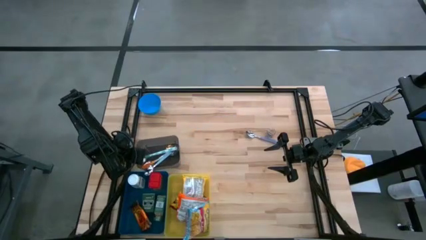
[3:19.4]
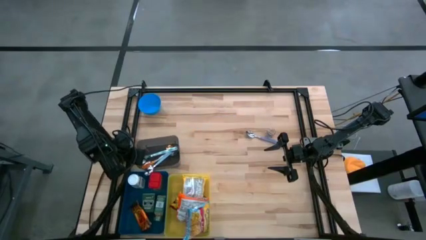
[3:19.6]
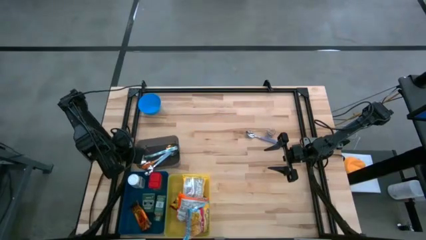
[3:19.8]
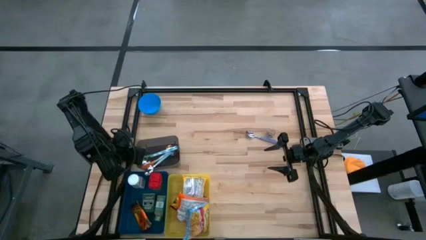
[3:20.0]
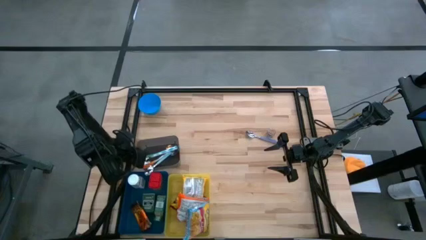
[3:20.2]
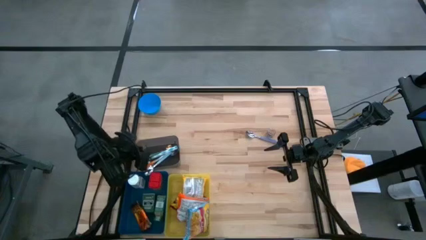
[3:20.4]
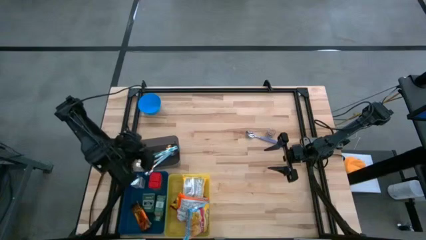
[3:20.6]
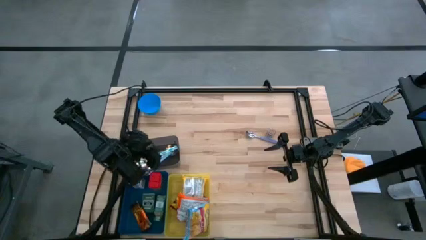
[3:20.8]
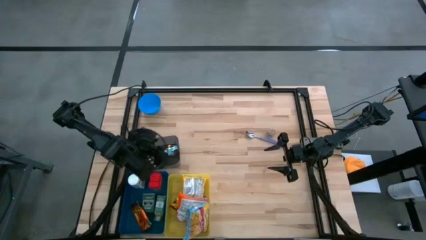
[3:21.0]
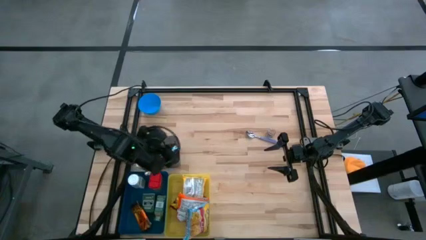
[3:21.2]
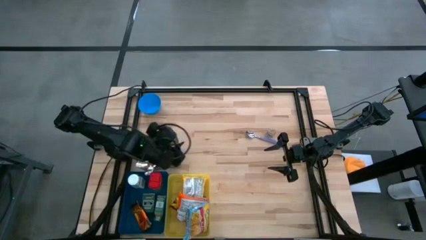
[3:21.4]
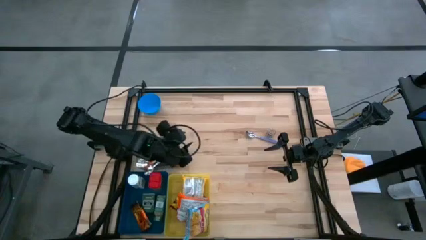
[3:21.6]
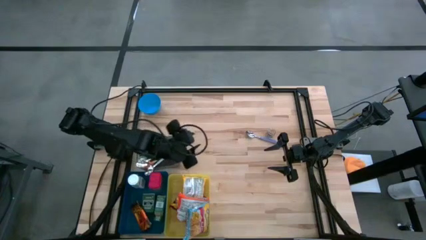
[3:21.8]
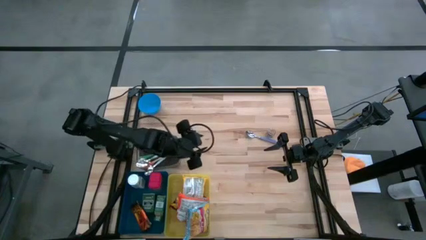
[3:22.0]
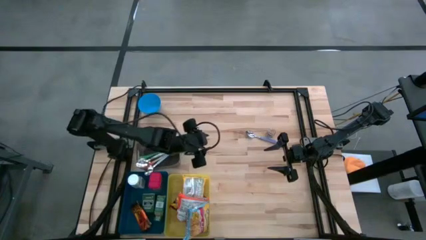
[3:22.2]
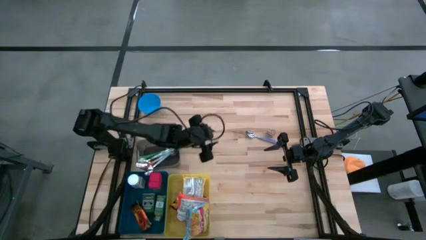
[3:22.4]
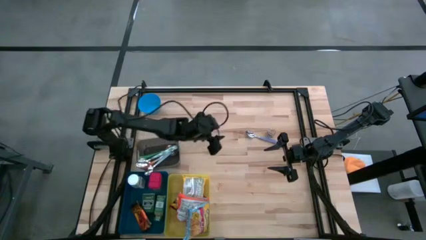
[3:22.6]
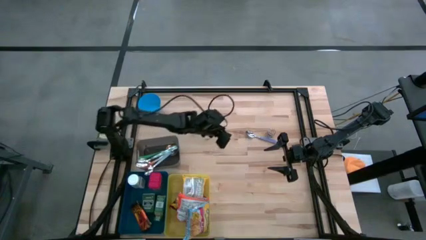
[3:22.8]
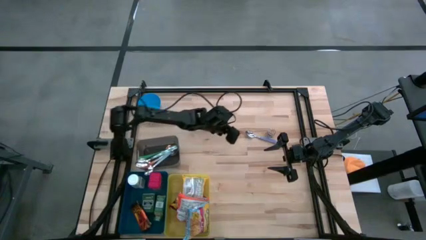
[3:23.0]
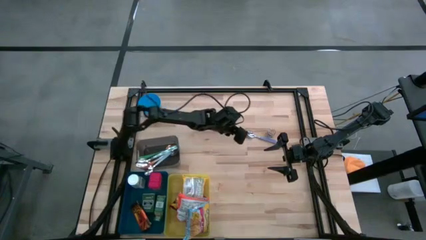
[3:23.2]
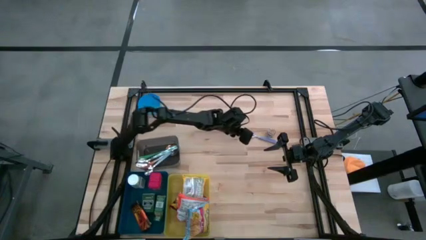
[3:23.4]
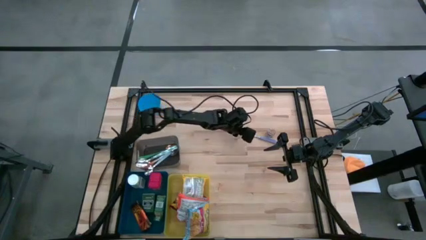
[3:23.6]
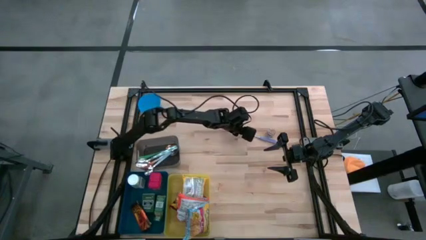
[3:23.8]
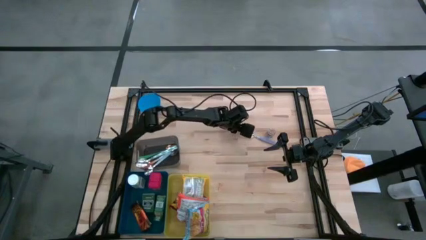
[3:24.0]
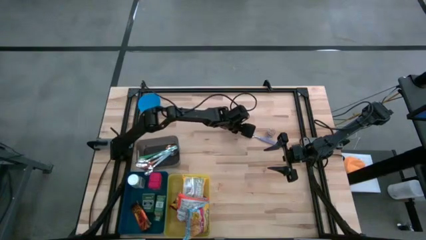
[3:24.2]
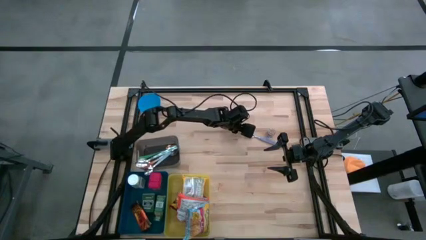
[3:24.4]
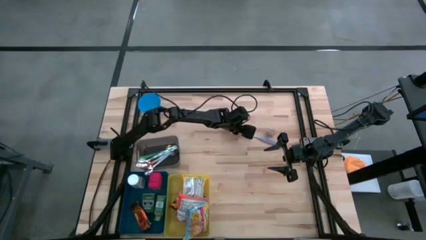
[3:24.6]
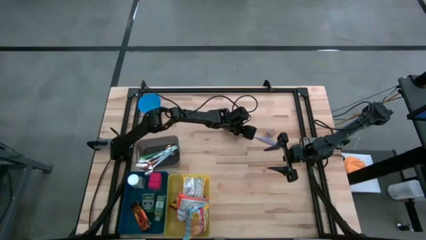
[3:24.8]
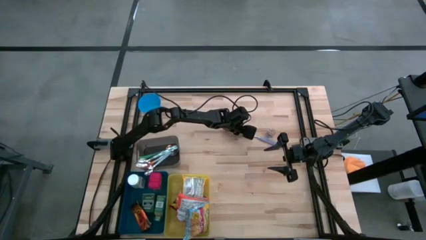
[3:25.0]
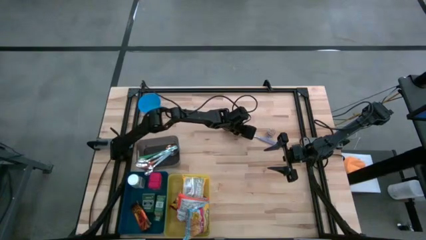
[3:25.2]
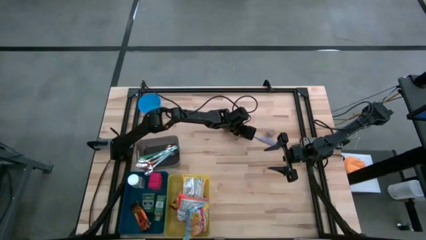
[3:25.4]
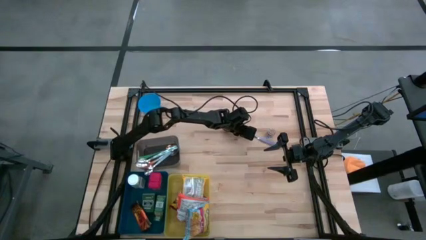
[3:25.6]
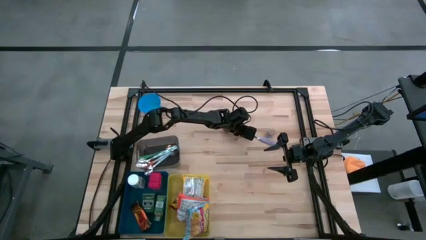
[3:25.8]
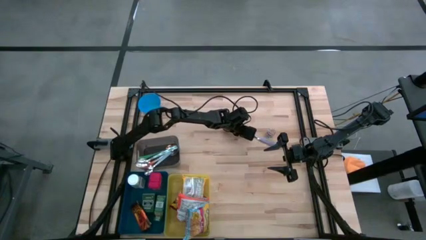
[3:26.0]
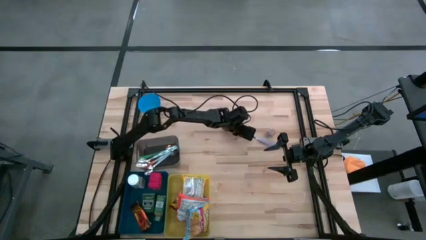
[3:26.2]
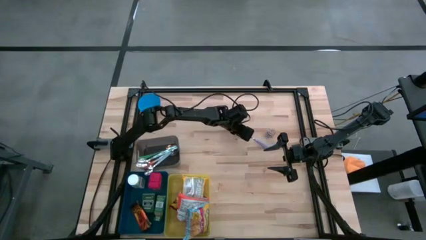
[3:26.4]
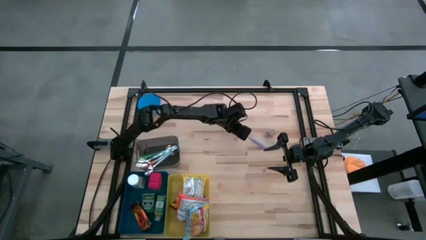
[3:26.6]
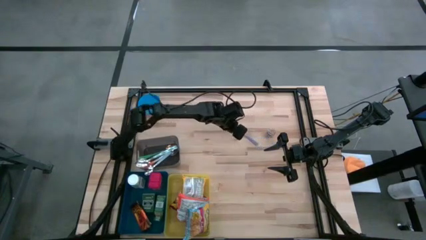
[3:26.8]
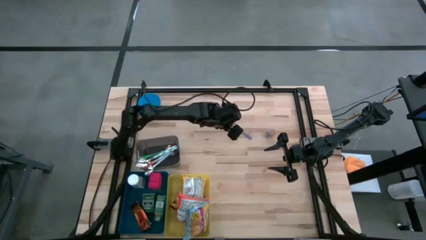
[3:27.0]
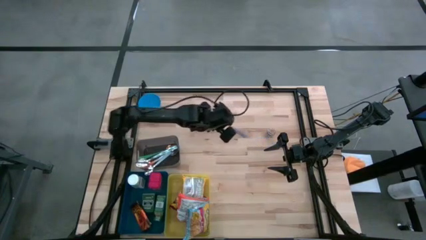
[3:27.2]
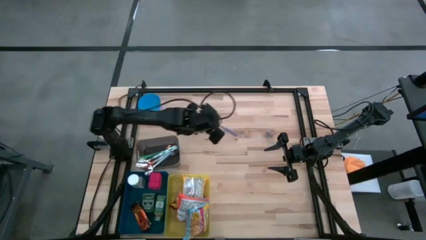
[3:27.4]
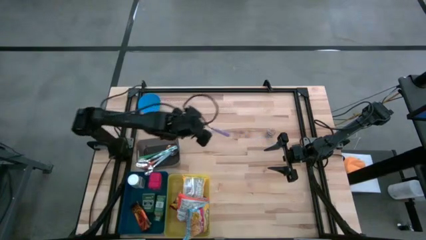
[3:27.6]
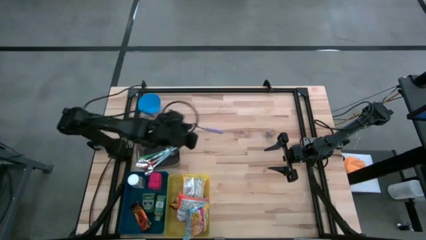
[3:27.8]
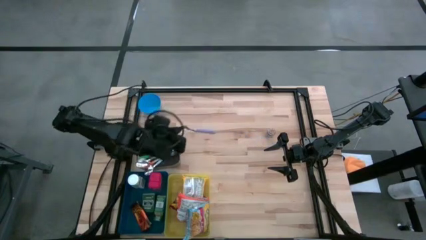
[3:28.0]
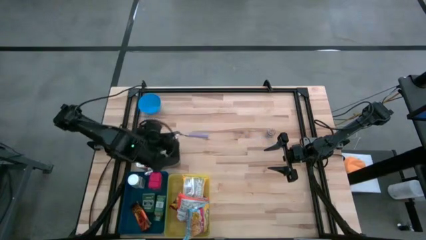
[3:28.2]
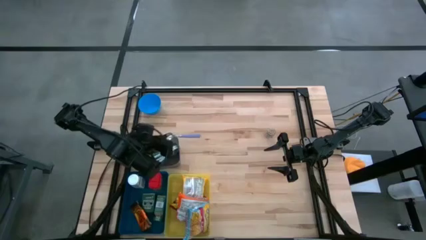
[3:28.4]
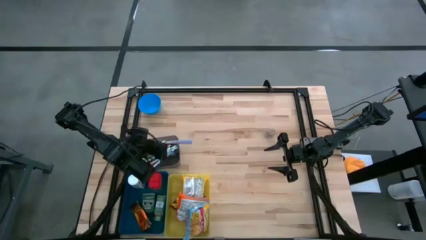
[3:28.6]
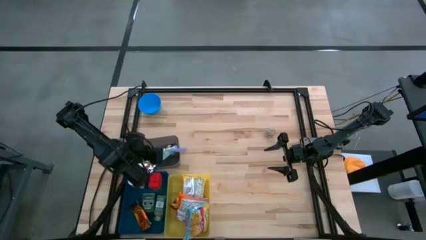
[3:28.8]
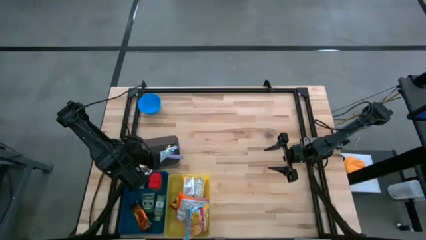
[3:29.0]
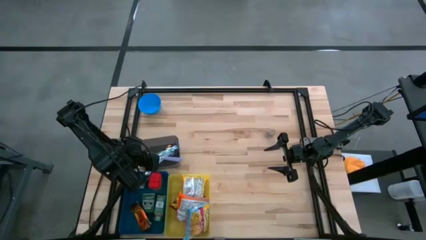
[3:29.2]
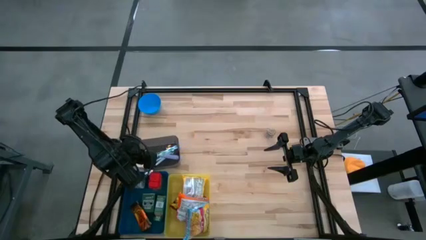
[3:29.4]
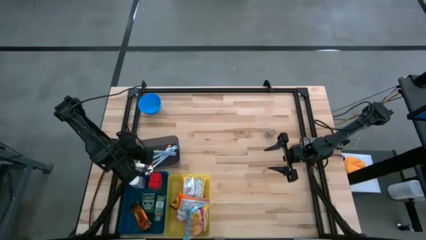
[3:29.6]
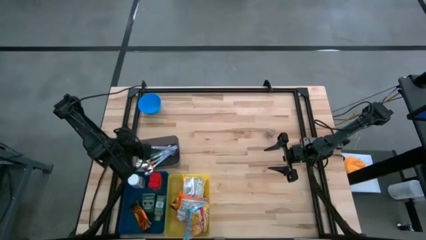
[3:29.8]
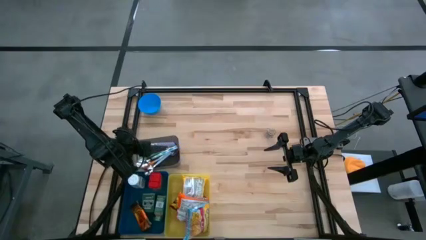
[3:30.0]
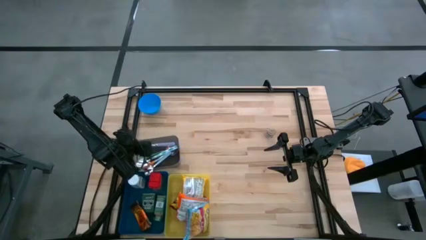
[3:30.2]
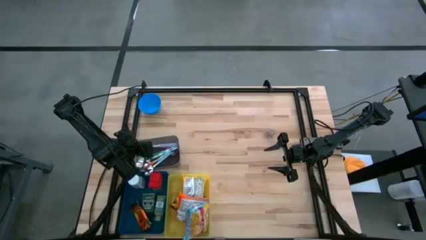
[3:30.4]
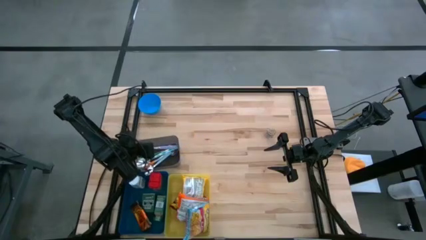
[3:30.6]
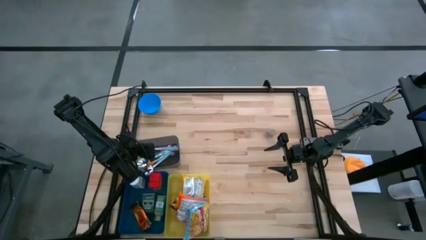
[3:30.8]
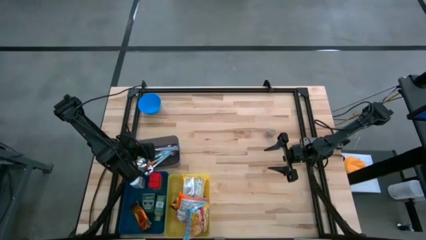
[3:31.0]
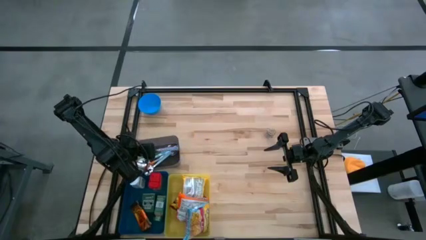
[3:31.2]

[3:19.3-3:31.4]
Put the violet spoon into the gray bin

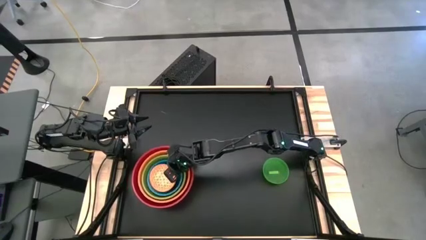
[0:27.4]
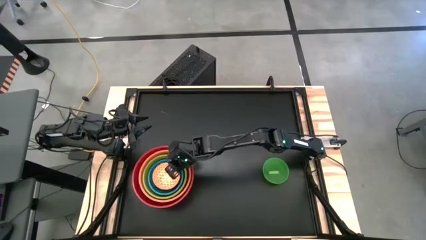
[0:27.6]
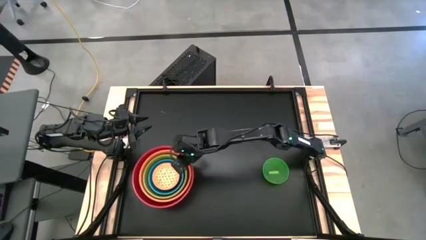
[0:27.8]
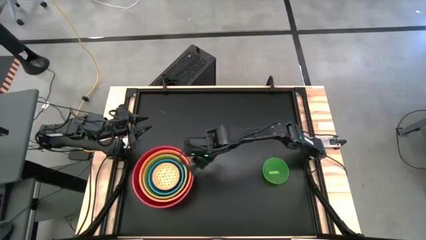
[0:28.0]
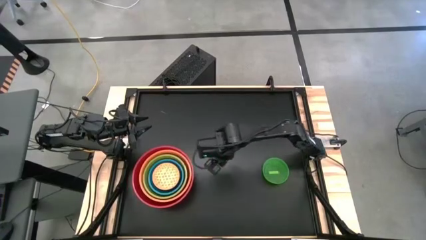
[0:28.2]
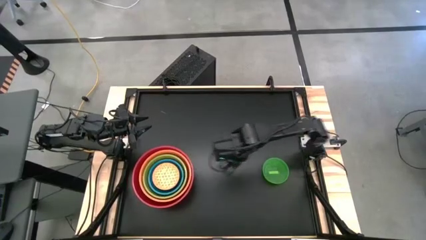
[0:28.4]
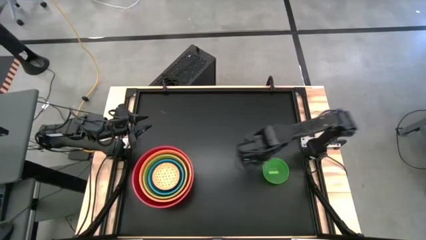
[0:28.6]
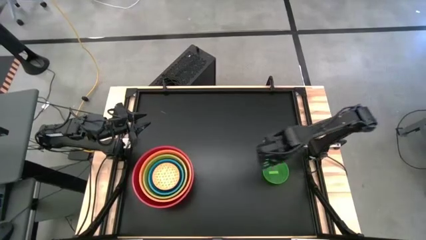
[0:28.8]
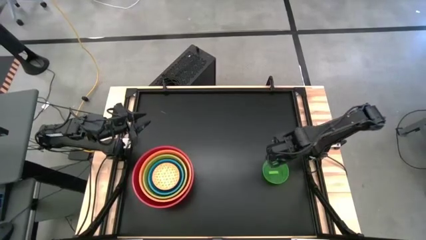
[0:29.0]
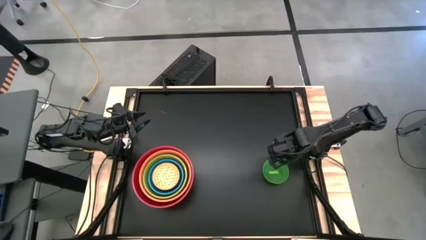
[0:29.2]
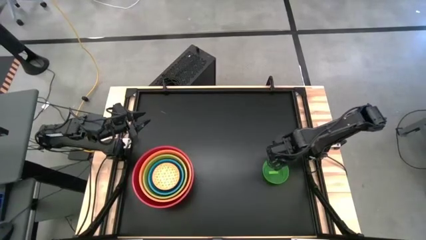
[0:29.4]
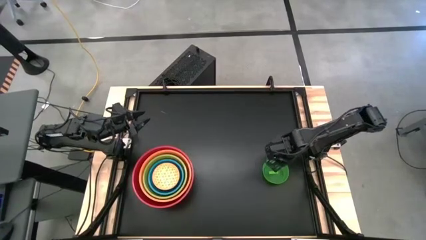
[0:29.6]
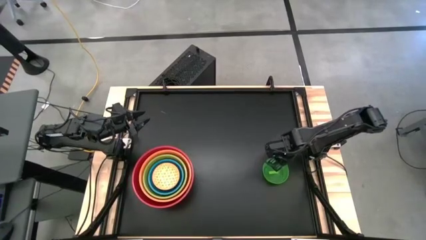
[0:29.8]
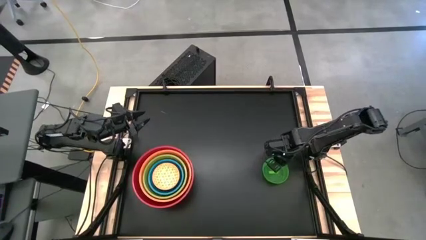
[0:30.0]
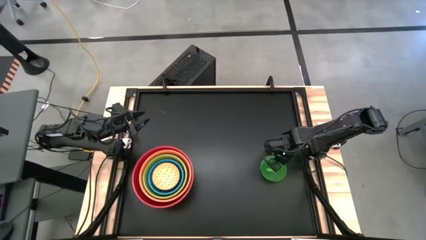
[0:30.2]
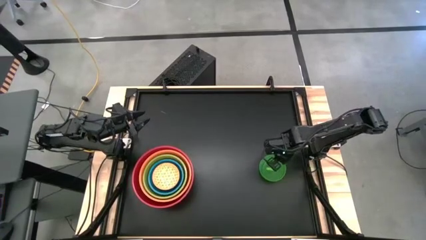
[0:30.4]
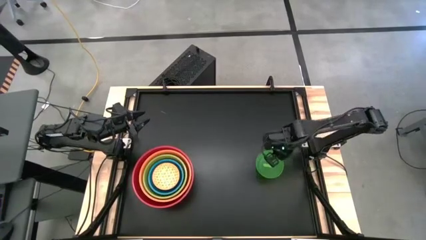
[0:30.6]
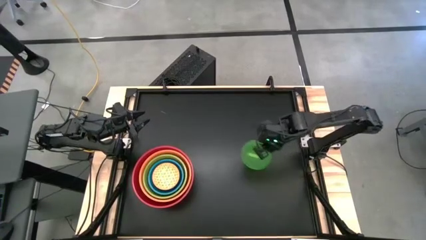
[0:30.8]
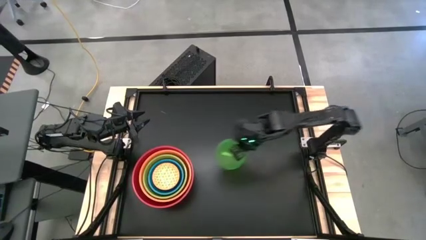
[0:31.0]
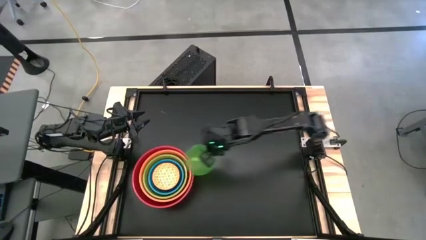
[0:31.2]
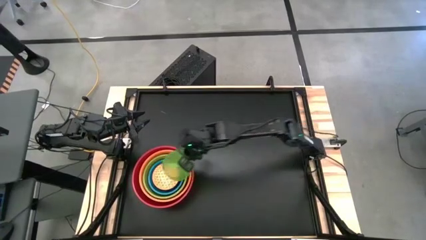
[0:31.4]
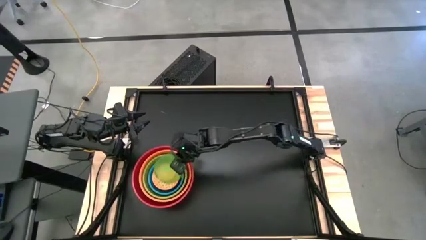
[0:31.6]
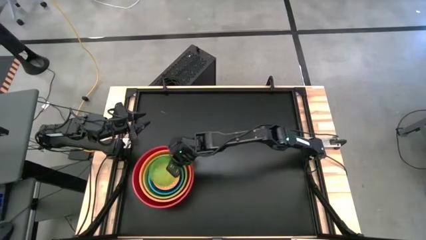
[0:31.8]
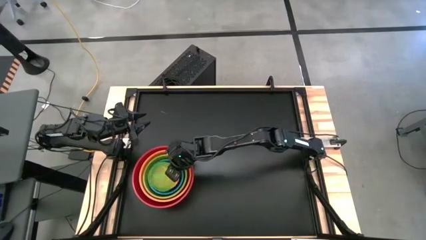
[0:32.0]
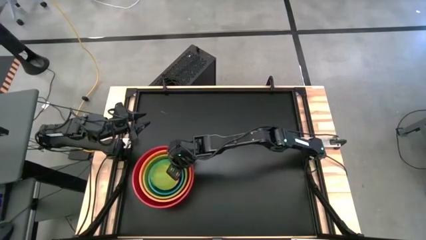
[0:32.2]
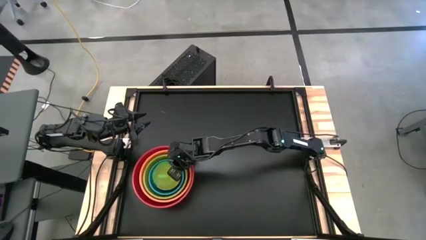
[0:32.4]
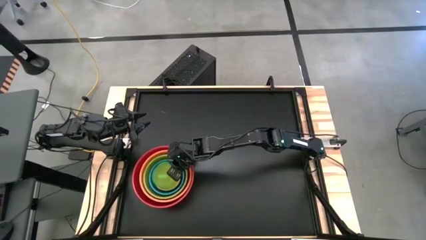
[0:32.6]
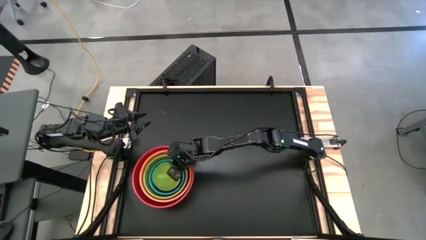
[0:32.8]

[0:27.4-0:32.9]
Stack the light green bowl into the patterned orange bowl
